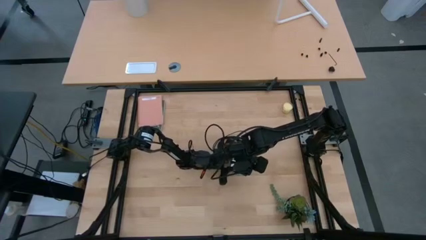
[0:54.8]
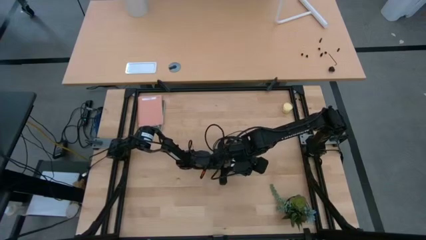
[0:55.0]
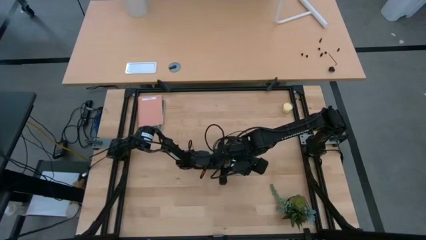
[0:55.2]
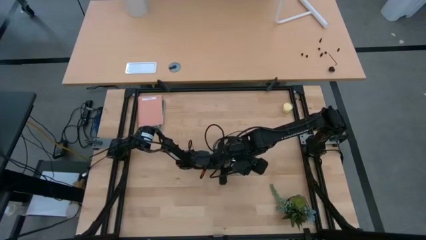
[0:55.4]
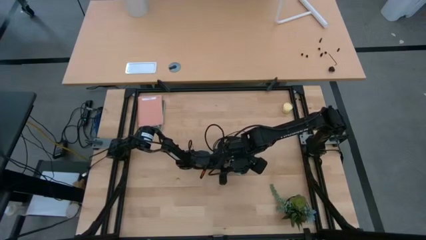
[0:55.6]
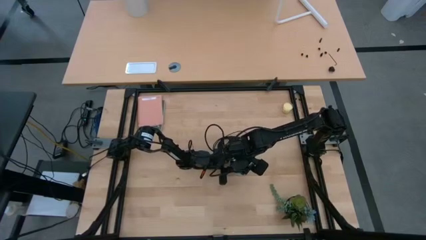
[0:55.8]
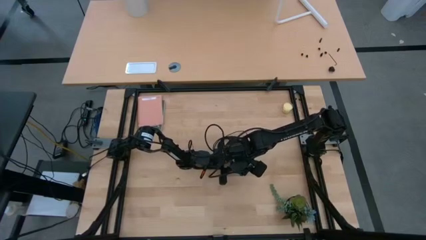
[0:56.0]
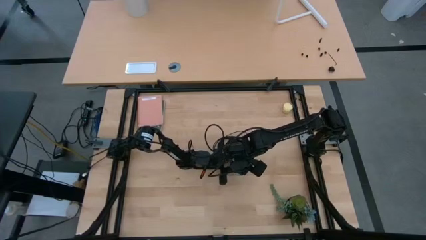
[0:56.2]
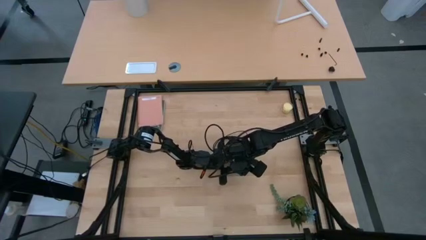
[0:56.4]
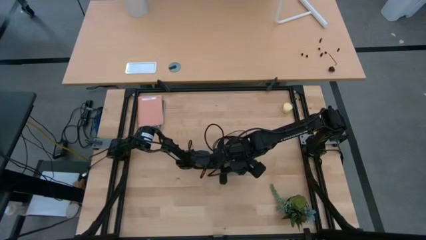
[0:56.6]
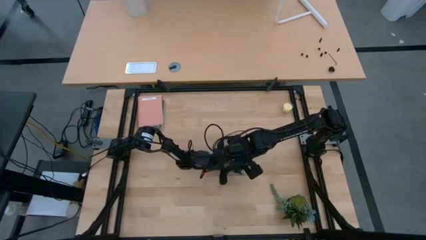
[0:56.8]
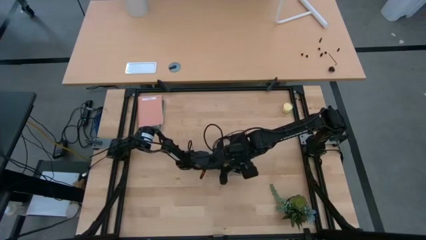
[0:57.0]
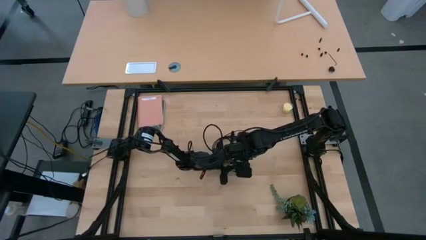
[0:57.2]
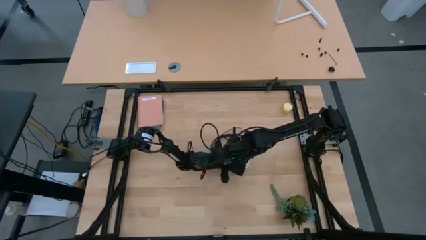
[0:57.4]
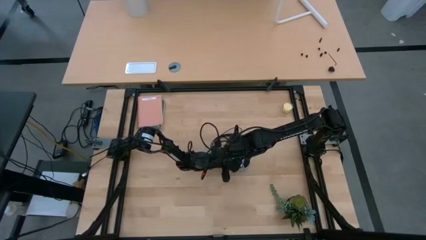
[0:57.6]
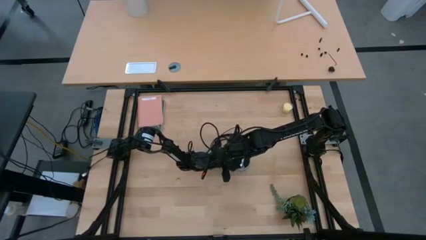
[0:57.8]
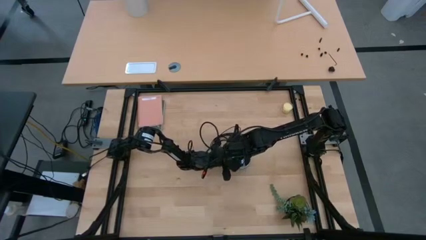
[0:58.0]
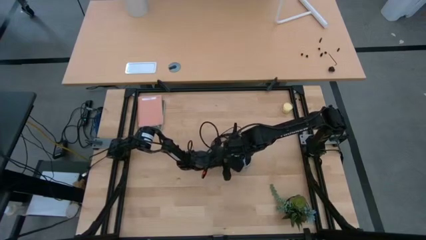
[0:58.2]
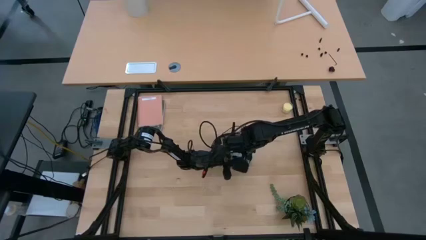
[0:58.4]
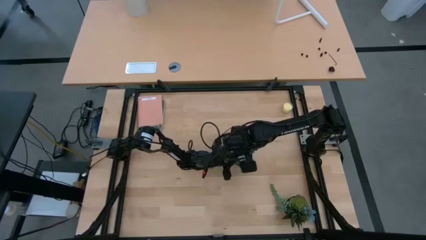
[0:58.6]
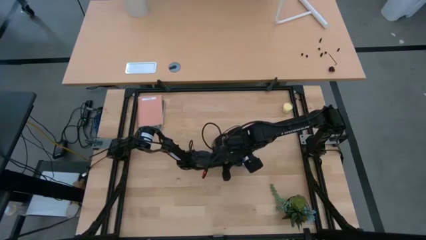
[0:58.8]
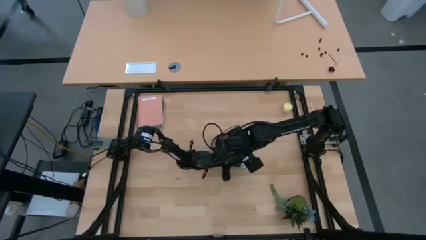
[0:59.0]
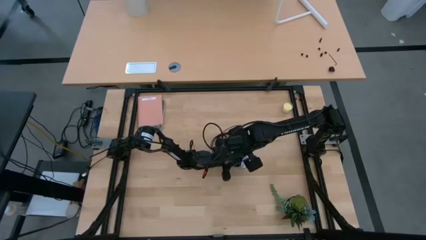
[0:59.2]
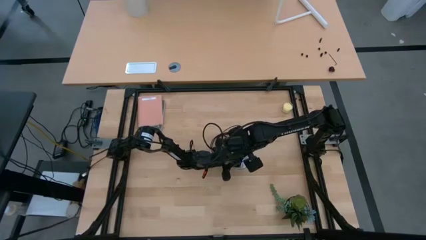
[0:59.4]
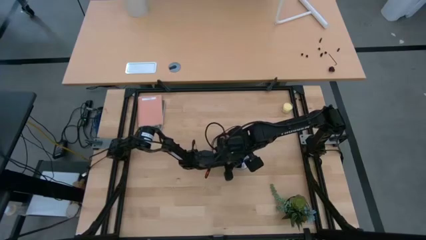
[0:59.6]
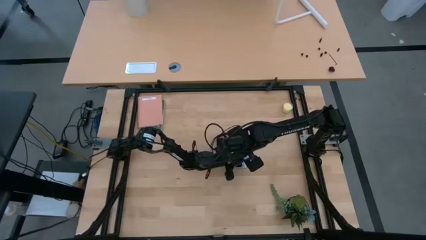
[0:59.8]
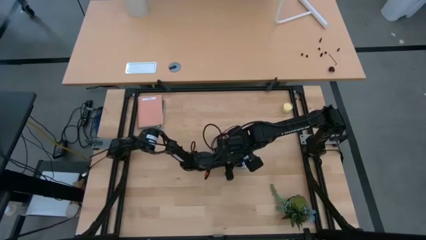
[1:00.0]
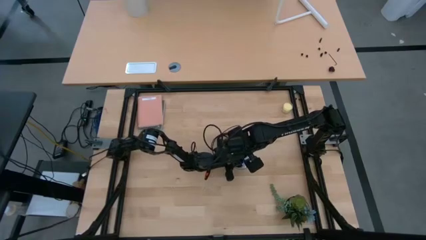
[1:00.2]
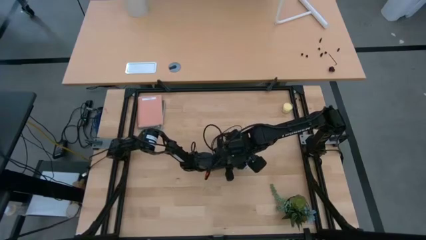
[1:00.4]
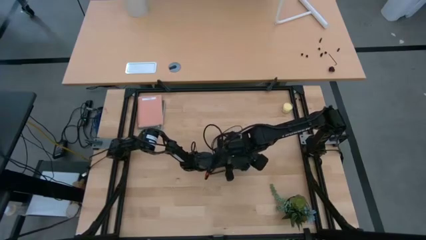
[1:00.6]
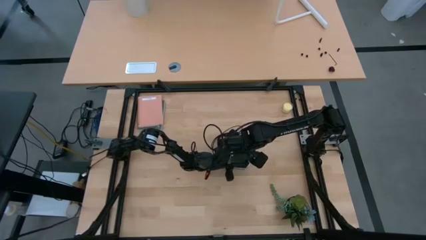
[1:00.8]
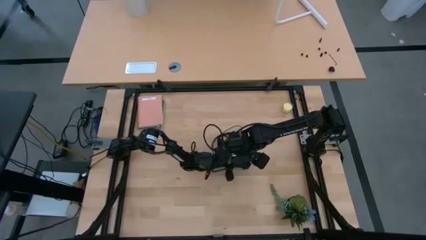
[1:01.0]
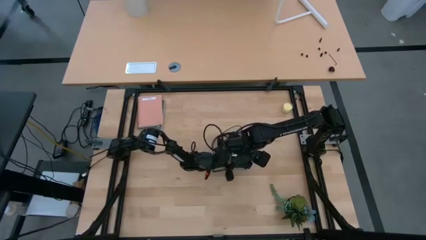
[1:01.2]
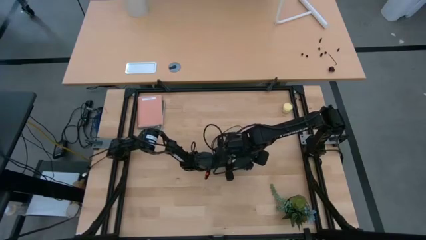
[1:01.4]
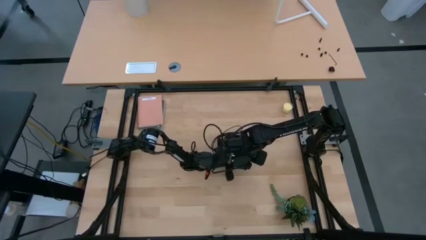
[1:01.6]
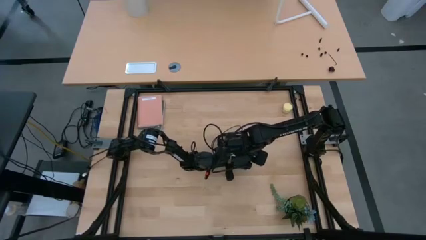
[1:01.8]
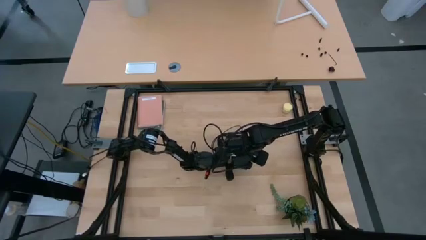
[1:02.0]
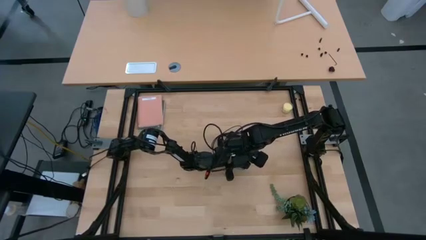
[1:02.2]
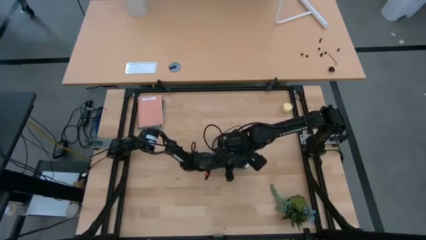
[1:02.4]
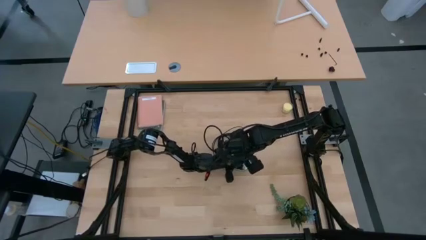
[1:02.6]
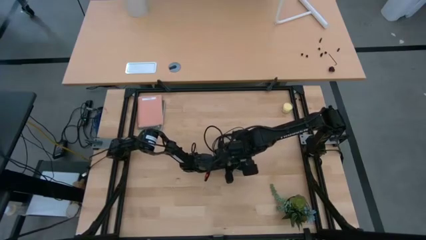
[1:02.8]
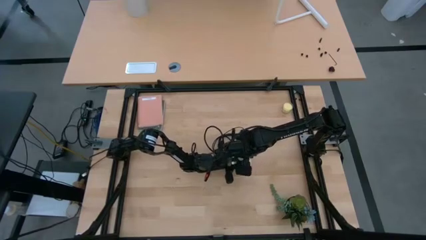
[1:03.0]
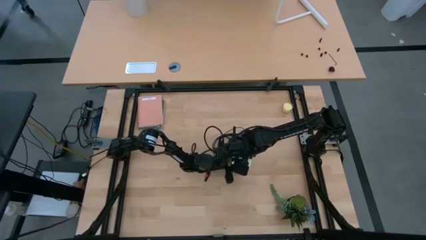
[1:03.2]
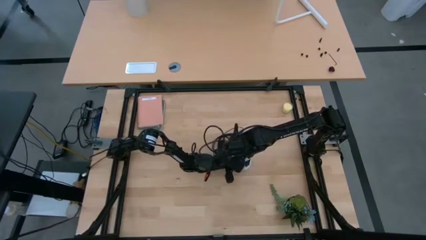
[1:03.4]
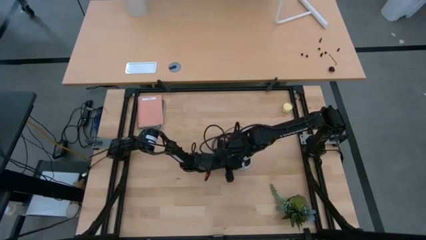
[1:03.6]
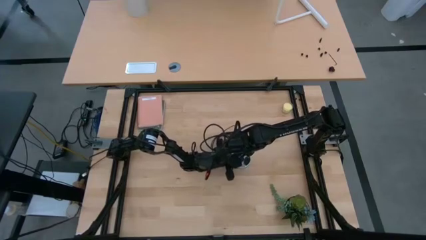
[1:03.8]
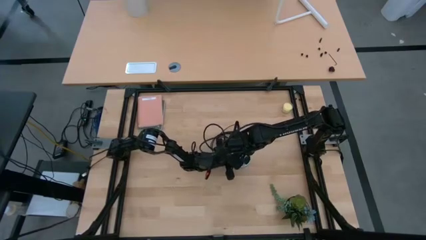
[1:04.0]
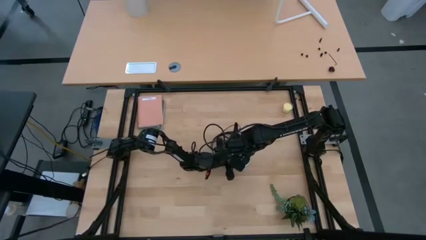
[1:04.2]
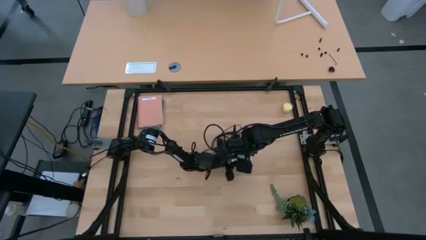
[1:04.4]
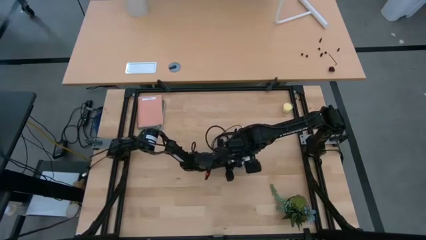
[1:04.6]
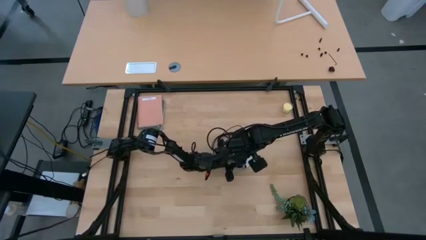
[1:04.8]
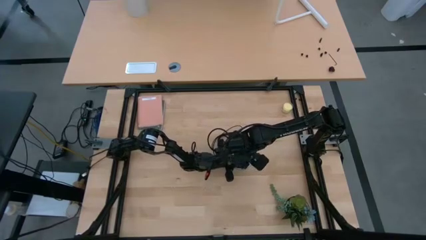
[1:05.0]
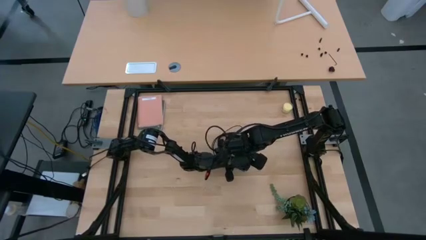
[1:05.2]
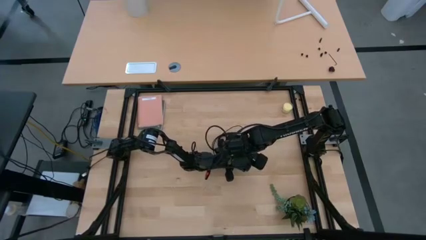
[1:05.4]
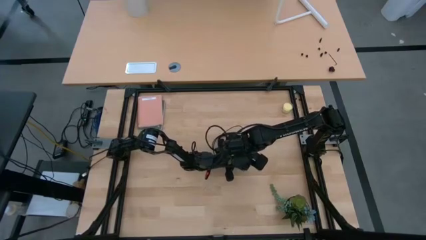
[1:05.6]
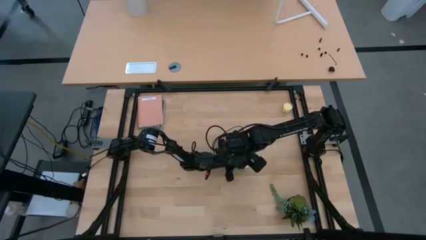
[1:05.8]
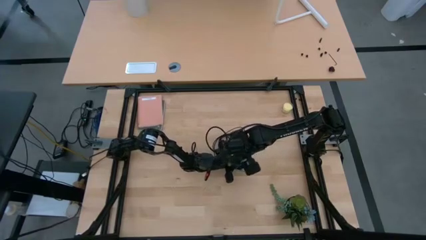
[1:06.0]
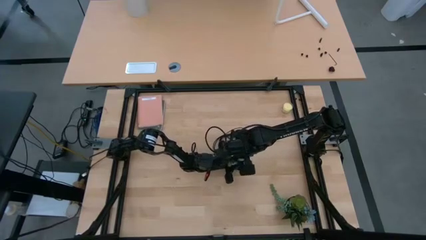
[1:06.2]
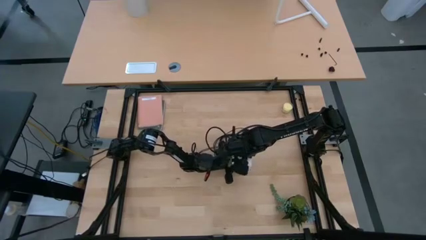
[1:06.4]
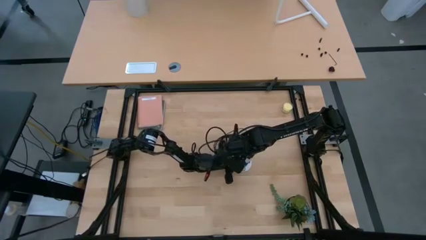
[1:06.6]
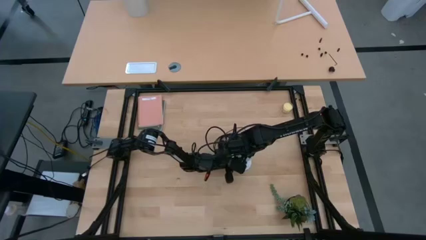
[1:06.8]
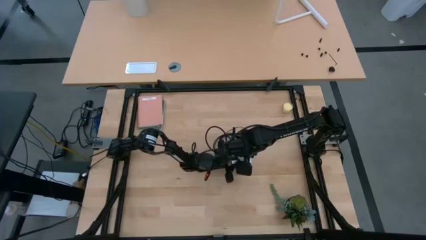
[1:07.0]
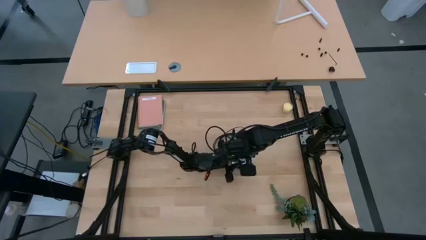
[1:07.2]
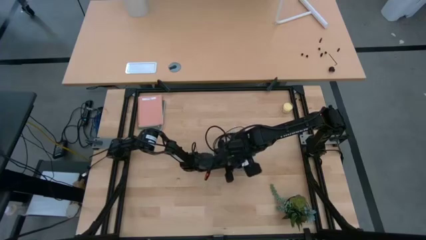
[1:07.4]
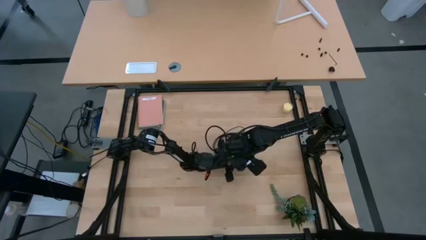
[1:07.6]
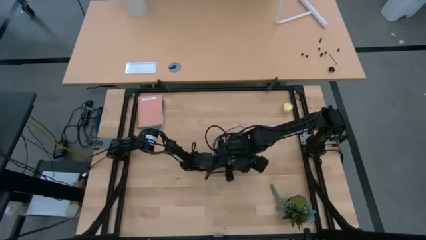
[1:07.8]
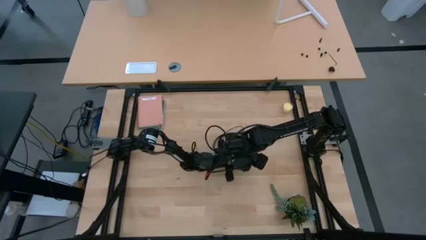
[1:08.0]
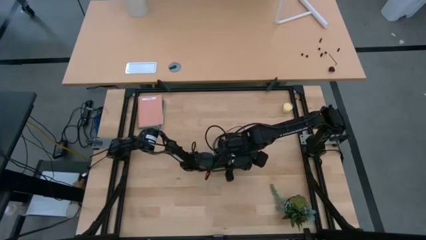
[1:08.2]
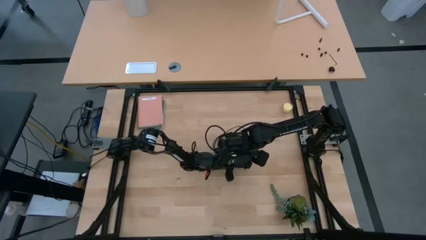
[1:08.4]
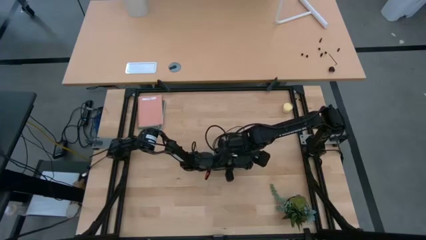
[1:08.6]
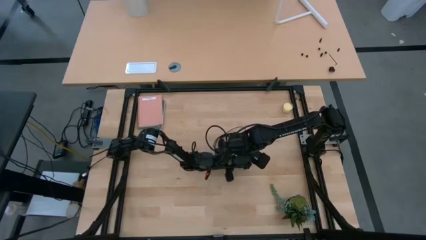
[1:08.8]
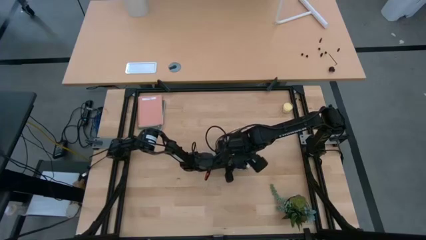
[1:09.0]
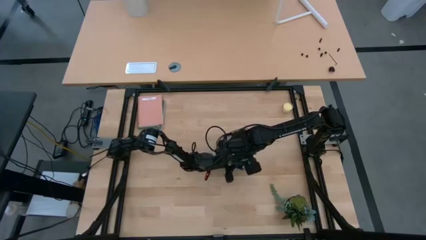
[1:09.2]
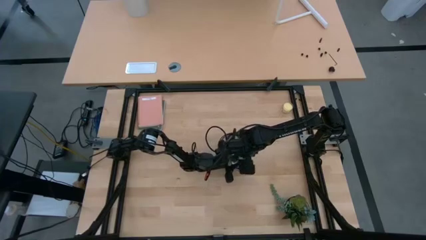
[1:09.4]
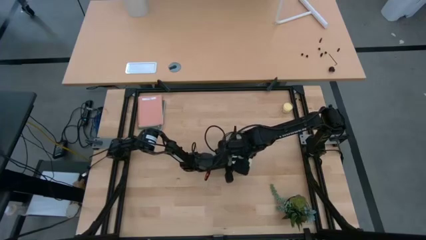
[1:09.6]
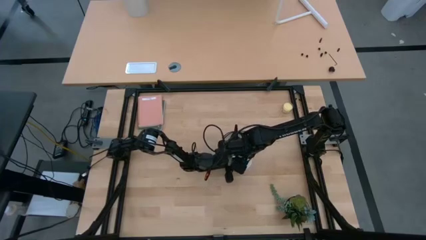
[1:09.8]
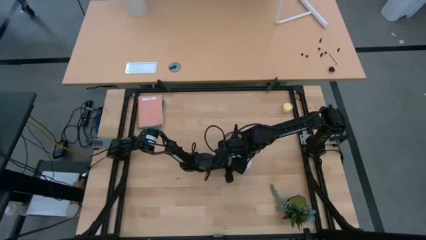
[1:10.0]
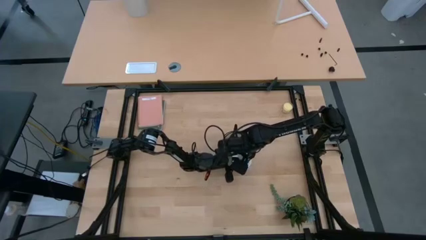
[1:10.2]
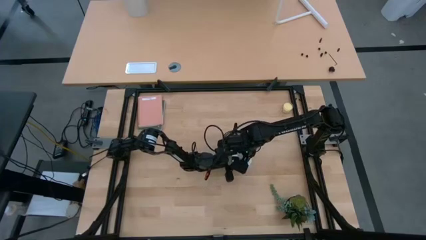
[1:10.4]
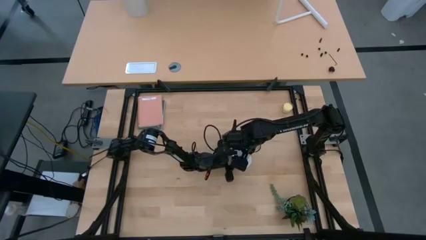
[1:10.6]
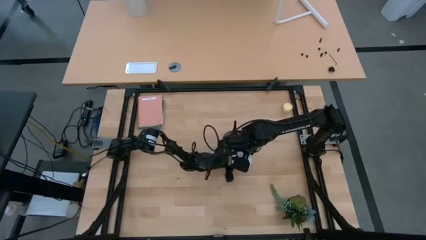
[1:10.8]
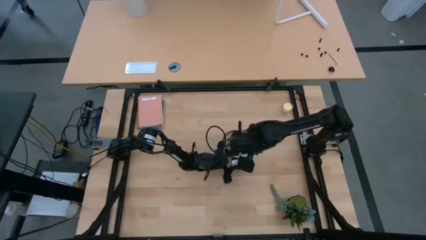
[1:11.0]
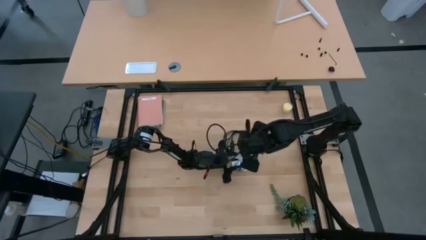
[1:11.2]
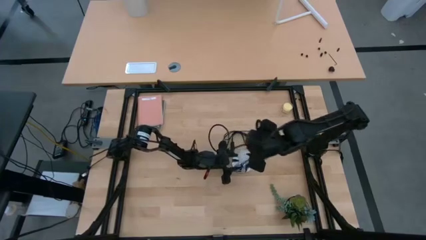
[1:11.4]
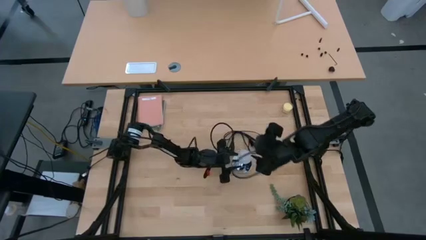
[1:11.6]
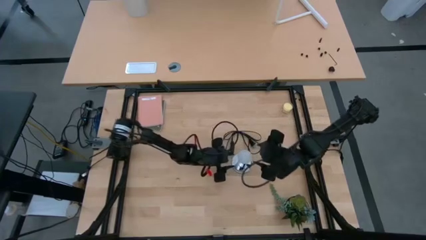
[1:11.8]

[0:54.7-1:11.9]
Task: Screw lightbulb
Insert the lightbulb into the silver lamp
